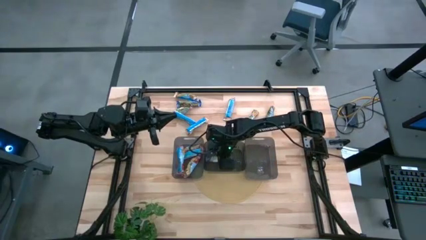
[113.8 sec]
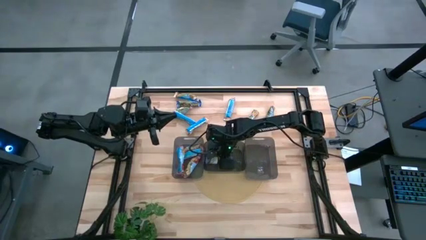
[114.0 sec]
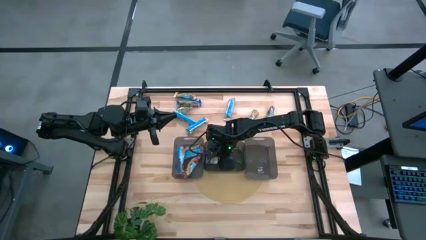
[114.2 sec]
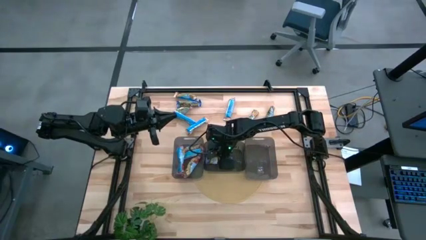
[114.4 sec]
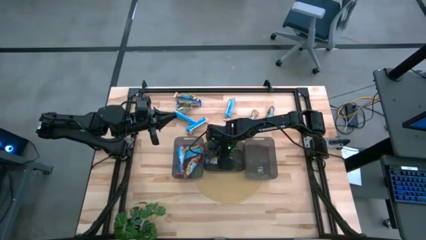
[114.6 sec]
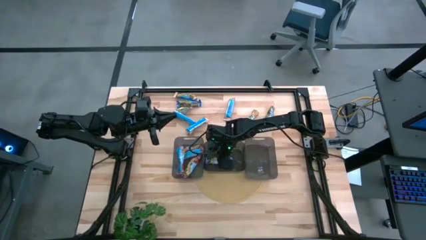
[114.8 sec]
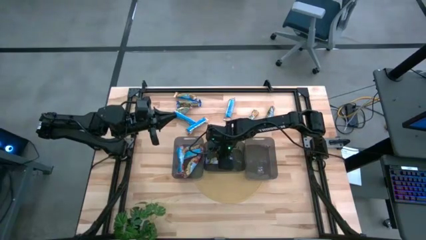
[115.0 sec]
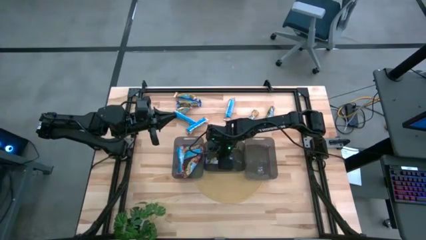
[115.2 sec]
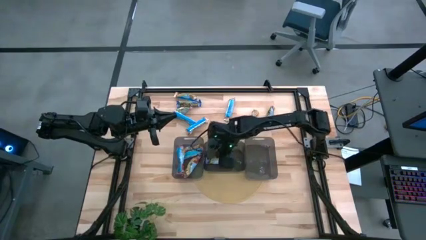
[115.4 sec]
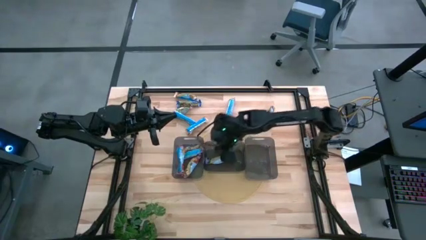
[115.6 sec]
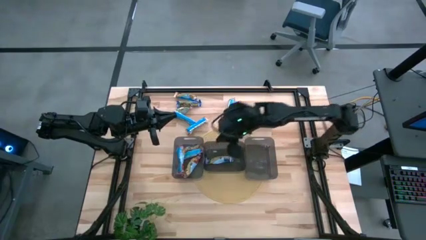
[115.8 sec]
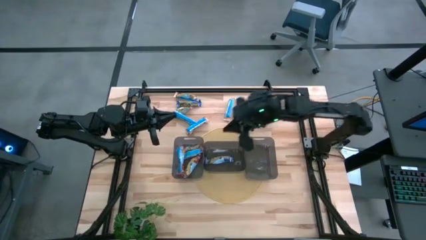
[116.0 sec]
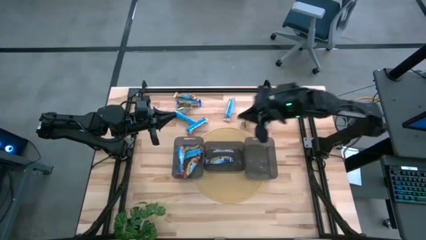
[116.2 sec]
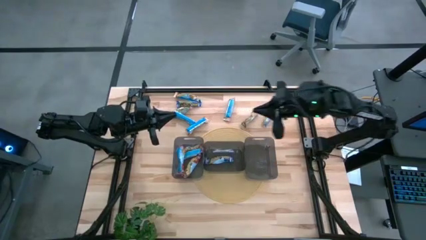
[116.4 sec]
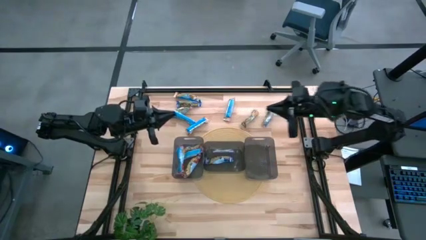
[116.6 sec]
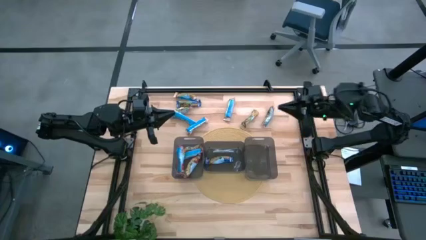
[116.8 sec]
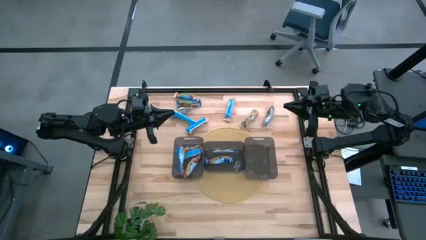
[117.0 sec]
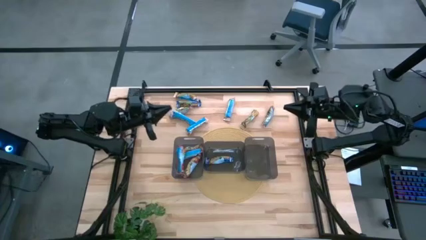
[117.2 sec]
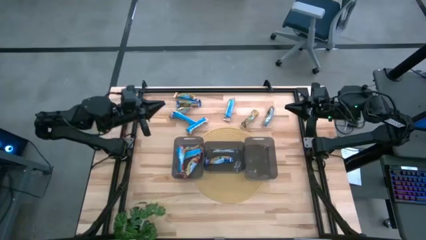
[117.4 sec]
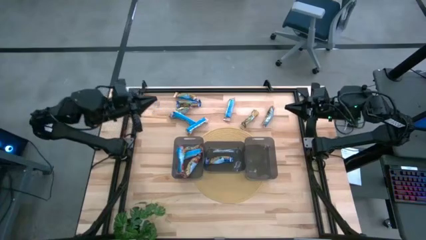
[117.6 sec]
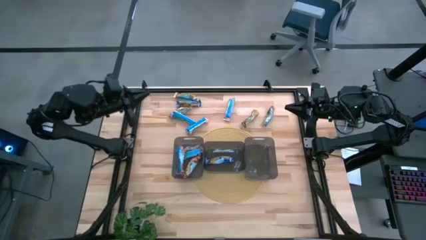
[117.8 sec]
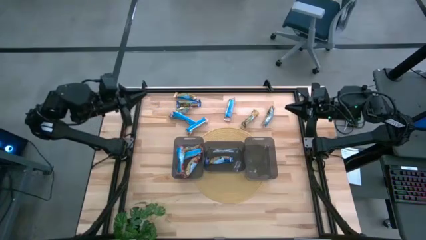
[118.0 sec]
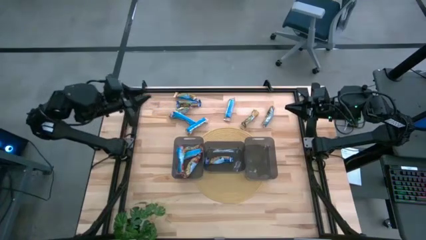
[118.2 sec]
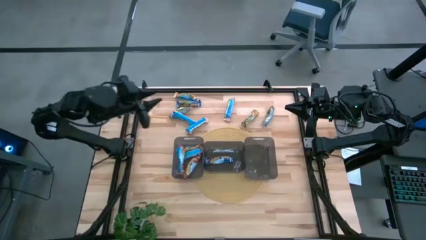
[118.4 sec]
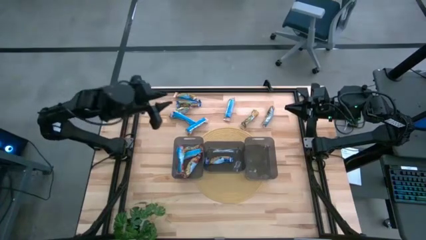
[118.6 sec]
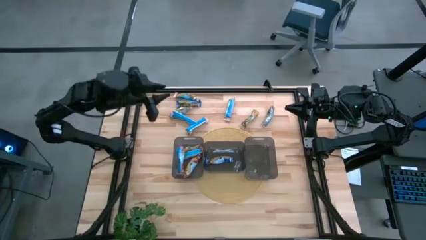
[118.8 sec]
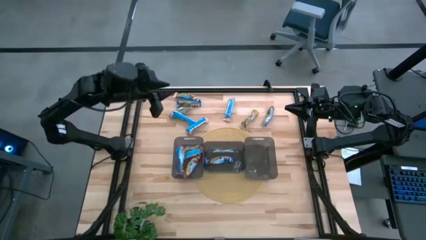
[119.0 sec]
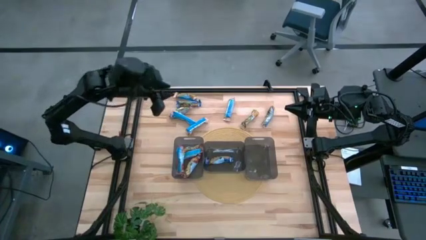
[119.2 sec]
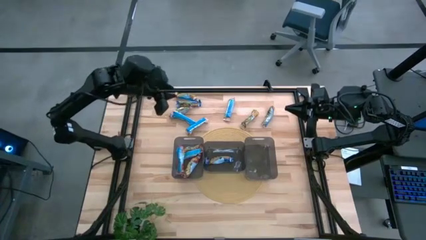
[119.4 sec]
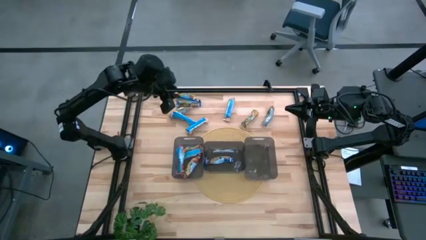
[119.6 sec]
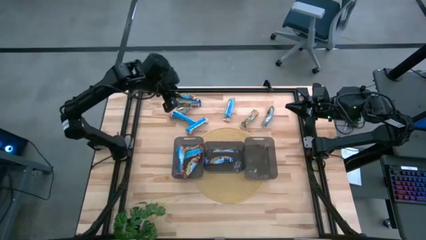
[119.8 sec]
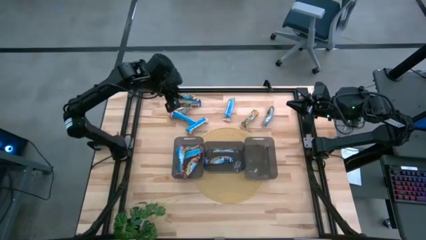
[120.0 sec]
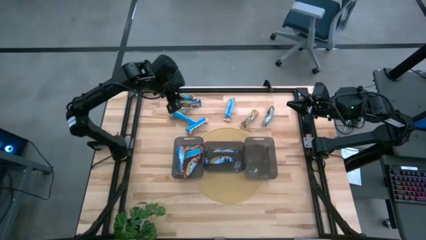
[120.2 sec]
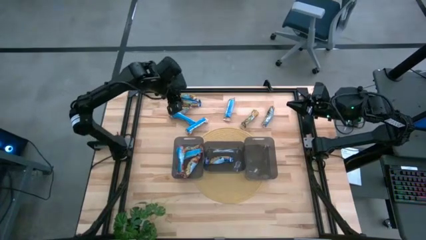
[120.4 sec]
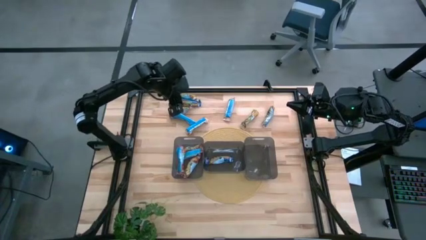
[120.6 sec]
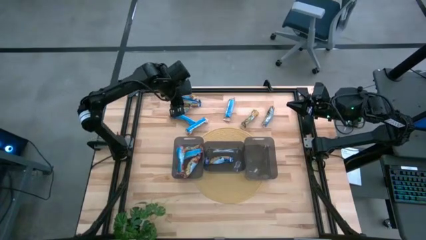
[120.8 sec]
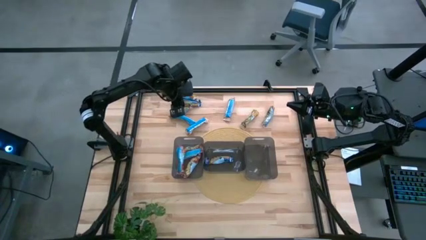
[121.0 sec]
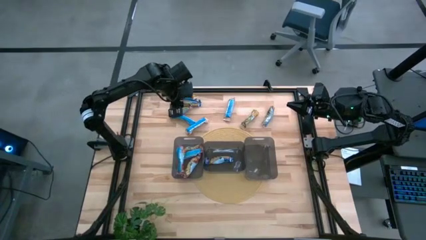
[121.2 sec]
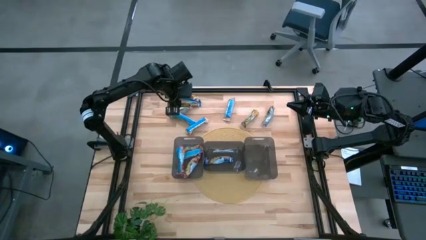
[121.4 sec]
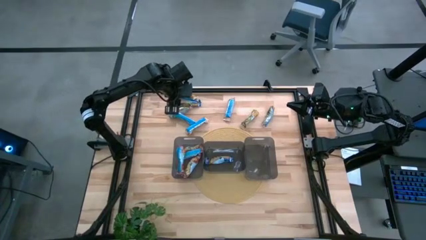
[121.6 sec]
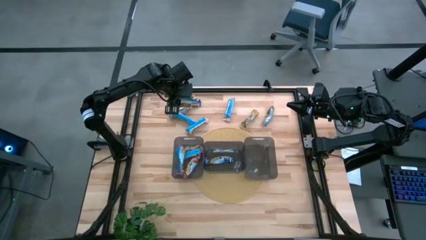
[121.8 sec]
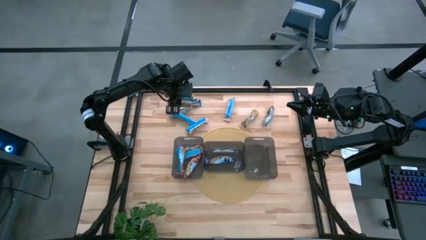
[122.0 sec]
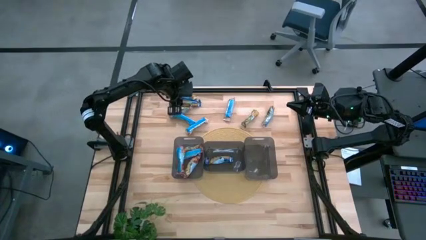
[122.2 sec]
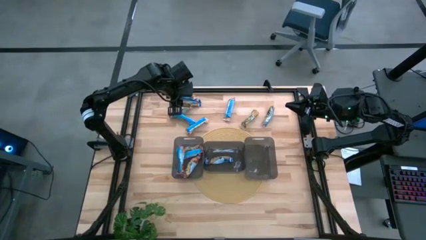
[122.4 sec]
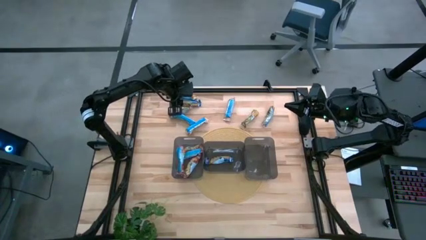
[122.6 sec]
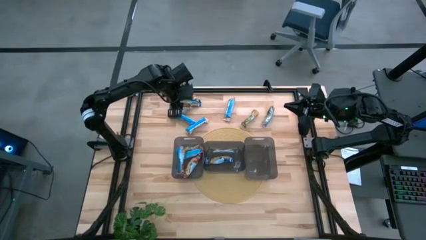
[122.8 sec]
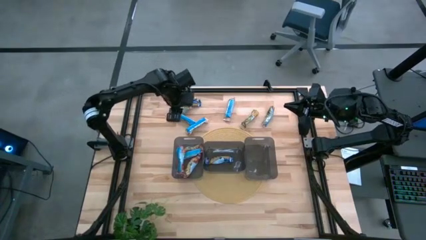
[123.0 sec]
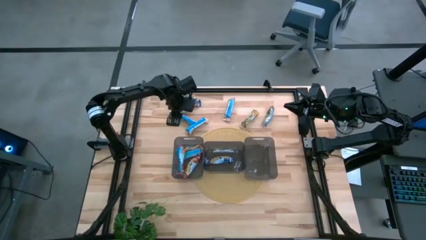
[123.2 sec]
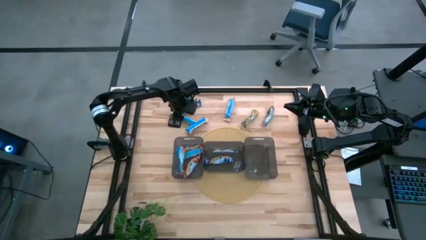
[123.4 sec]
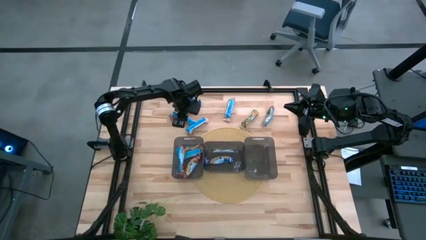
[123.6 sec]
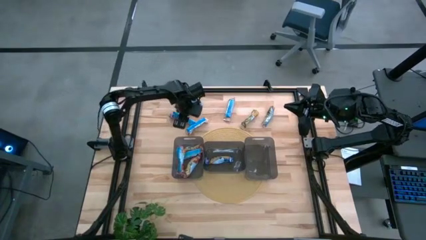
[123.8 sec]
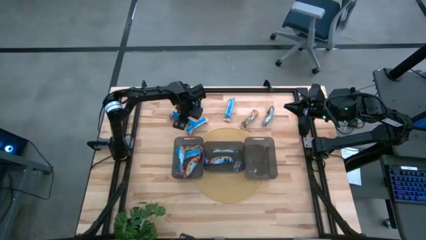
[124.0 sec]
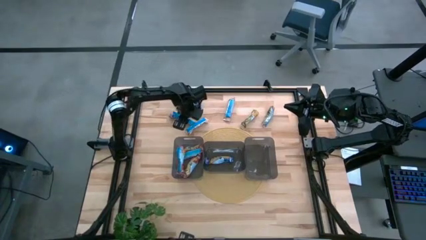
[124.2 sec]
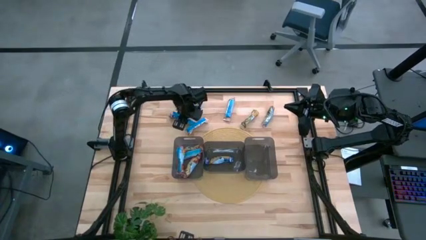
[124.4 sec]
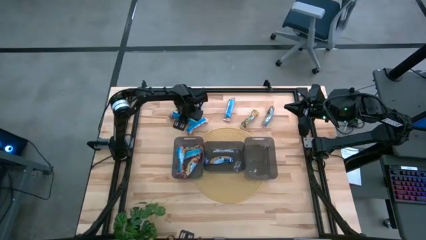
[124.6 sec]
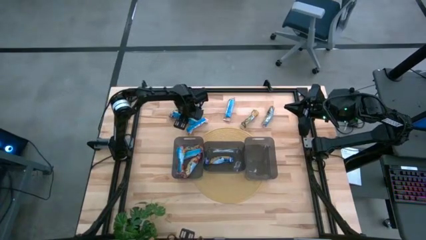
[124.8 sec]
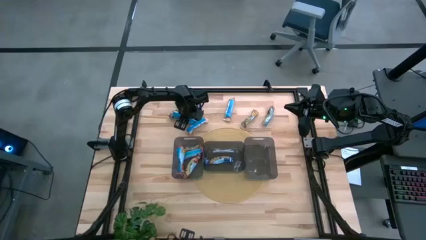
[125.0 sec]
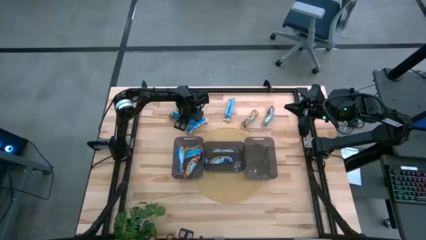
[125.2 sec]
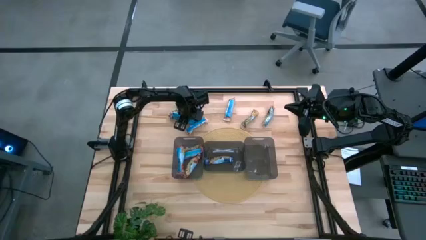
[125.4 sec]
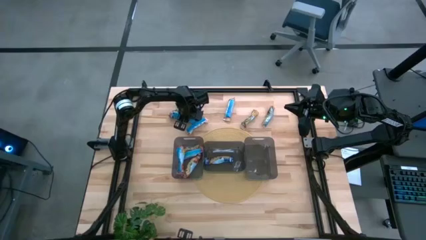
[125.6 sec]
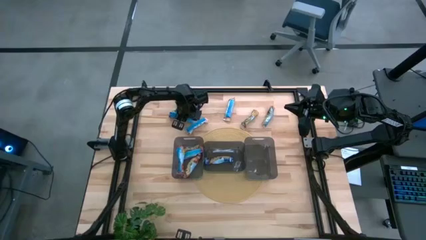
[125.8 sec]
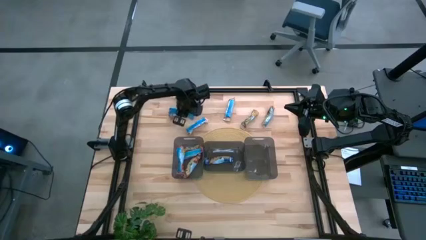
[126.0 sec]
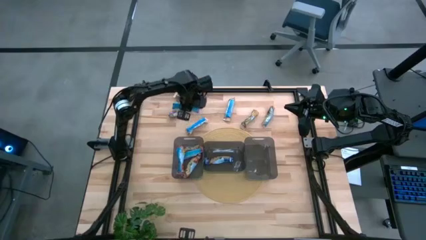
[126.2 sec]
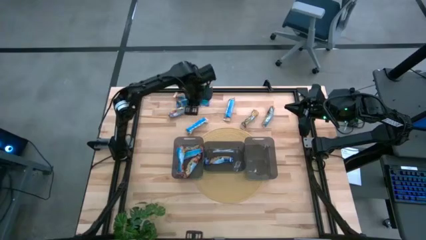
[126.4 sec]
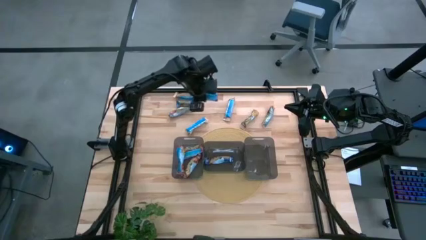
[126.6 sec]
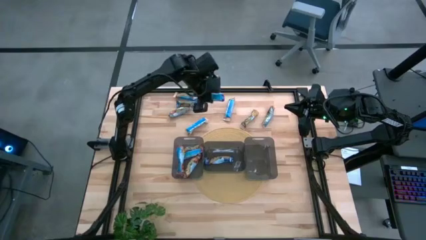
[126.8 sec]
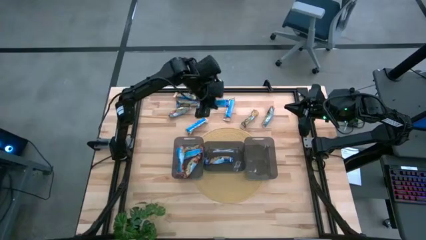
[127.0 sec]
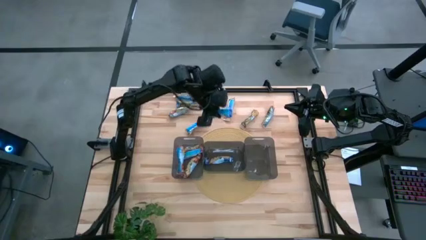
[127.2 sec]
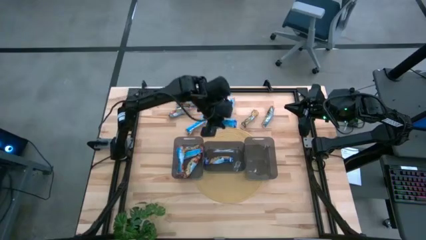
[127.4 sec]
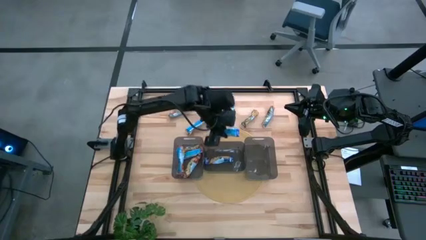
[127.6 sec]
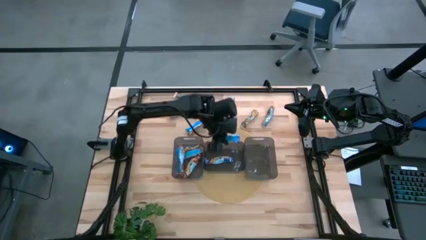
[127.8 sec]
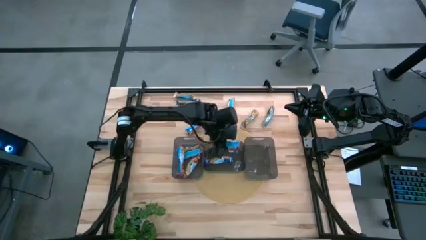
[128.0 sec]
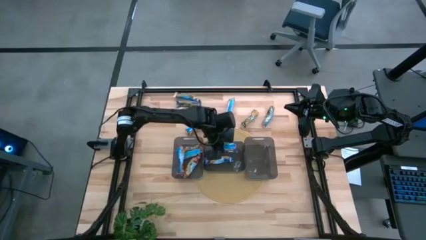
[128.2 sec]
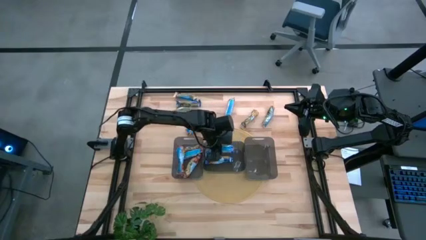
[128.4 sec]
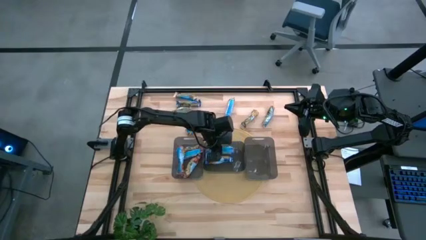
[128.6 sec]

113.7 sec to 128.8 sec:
Task: Pick and place Granola Bars by type
Put the blue granola bar into the center black bin

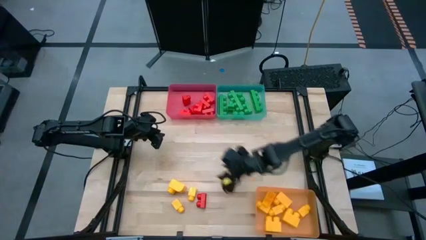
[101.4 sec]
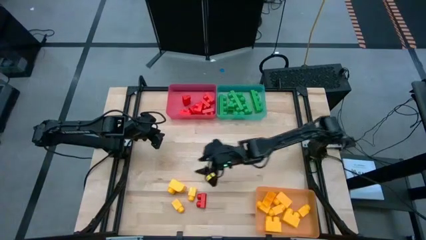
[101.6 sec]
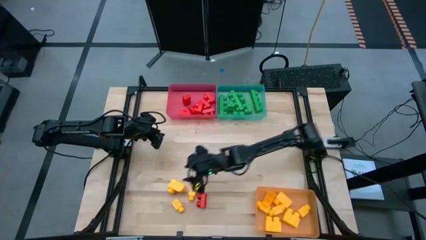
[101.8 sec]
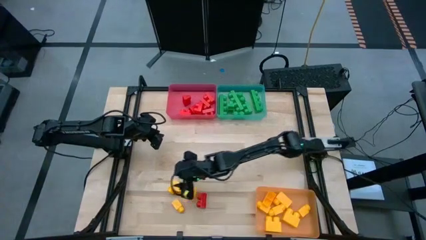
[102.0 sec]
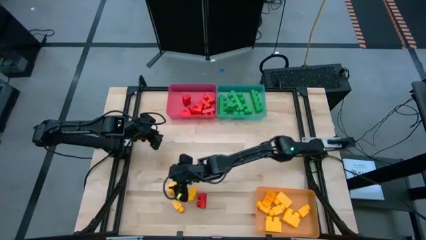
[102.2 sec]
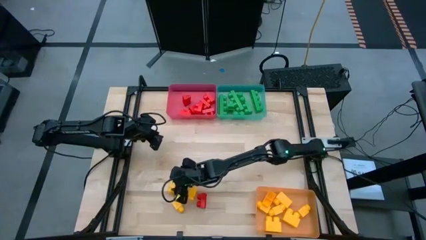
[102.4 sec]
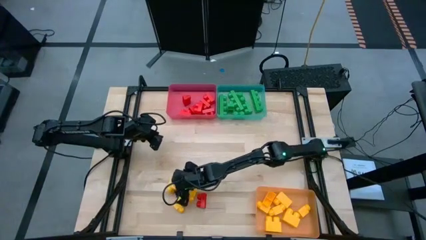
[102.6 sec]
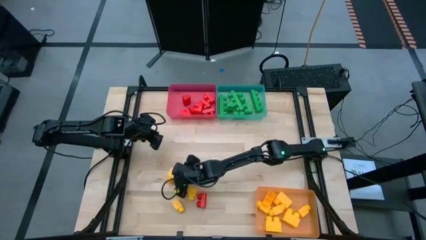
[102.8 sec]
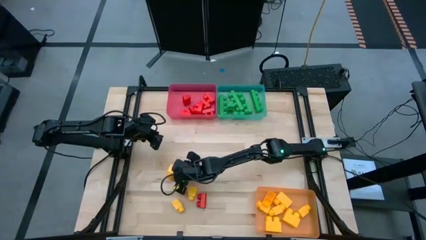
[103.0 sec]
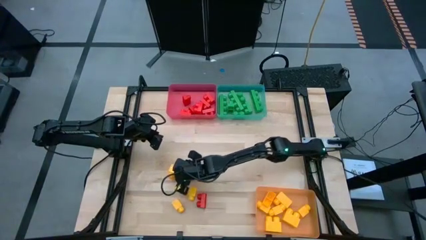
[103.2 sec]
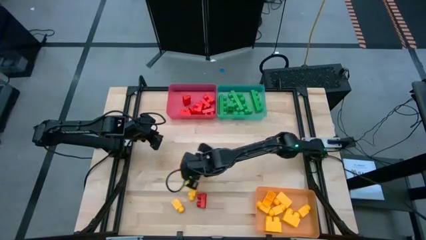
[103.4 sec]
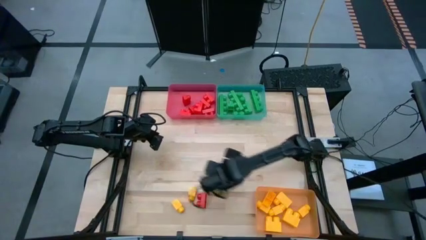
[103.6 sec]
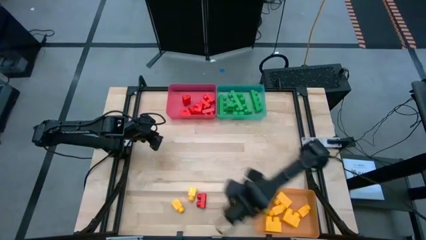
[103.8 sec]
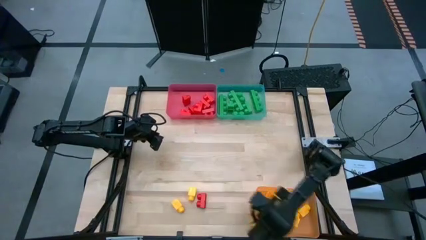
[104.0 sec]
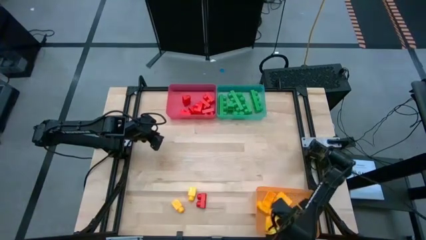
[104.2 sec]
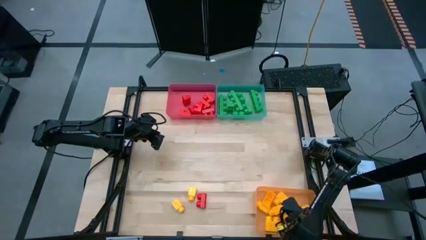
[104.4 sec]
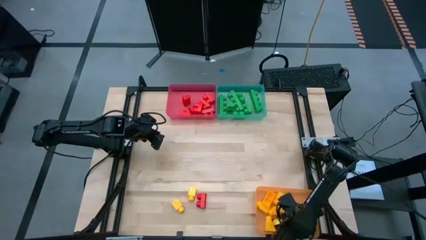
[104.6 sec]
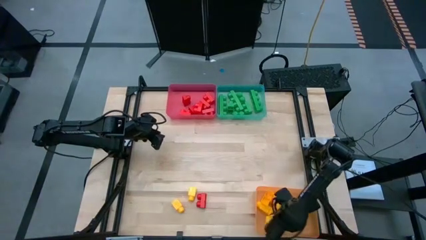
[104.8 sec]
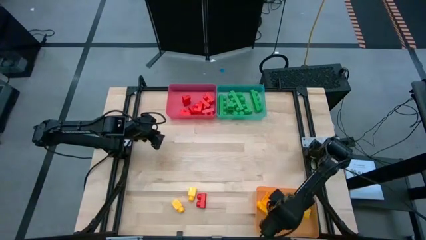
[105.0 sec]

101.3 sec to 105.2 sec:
Task: Sort blocks
Put the yellow game piece into the yellow bin
